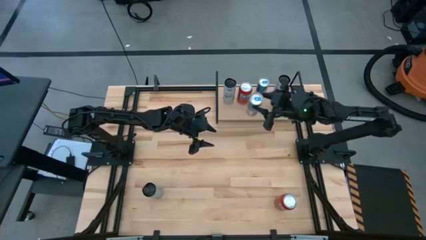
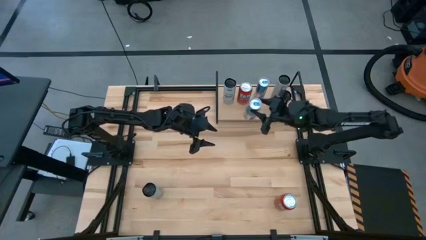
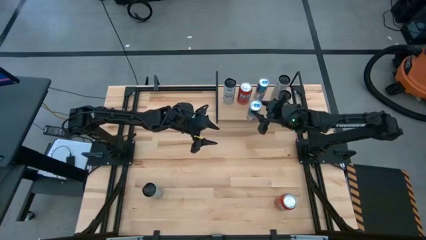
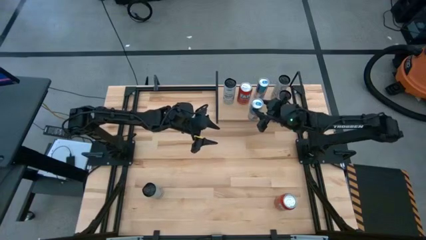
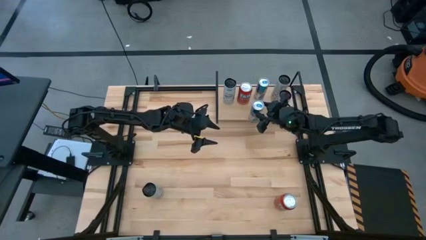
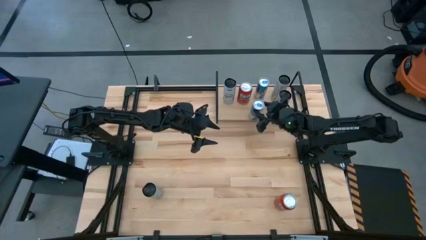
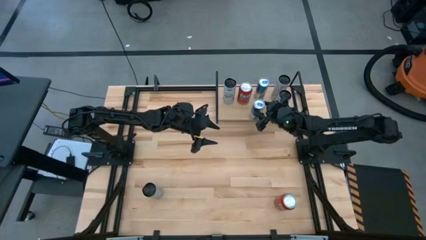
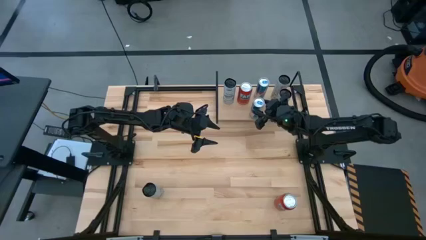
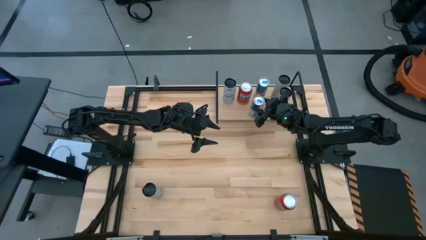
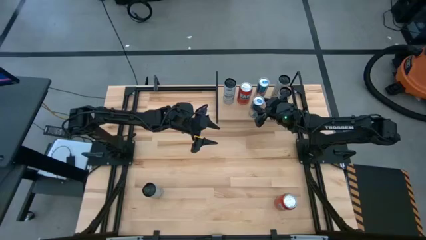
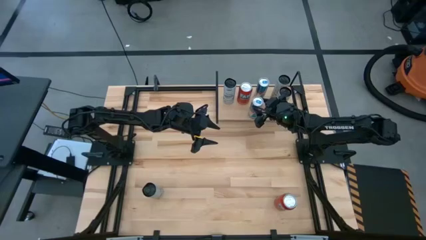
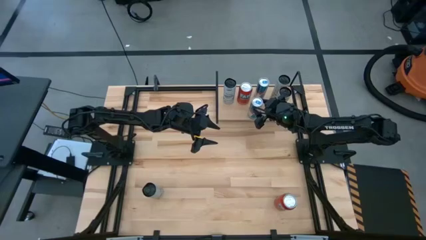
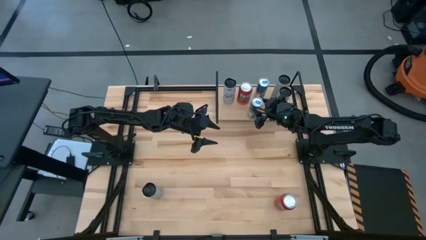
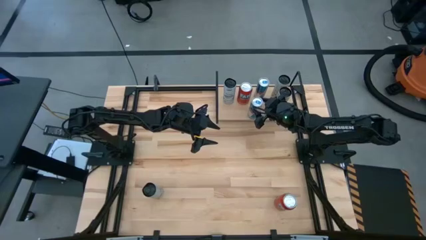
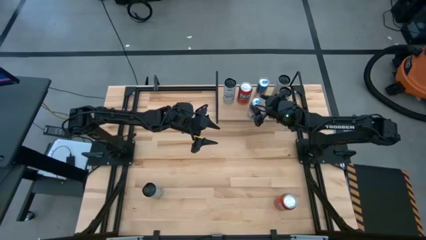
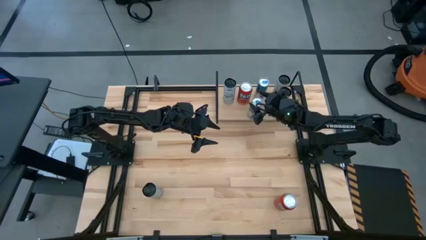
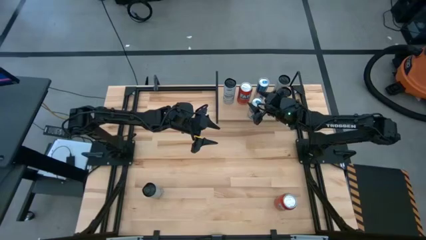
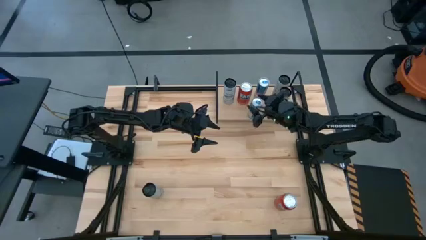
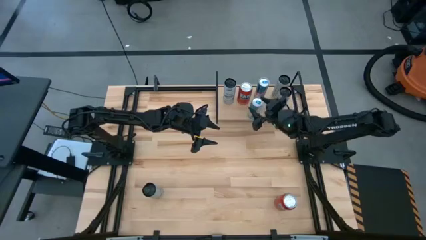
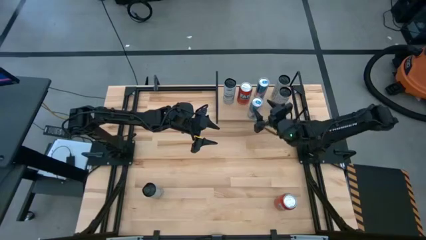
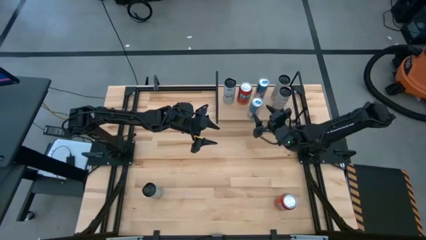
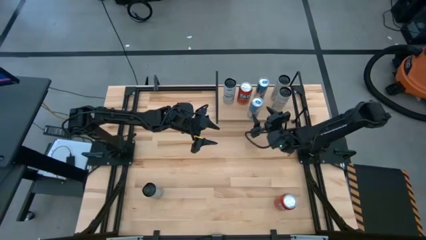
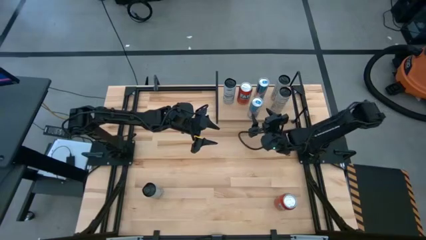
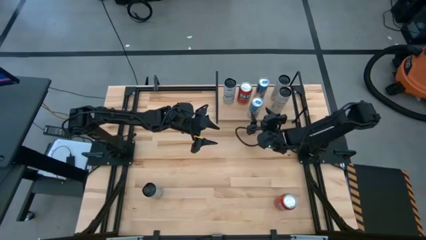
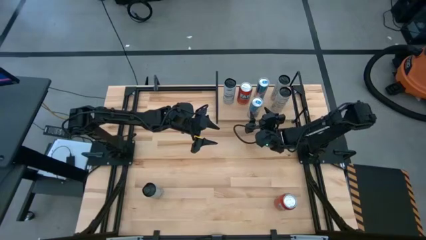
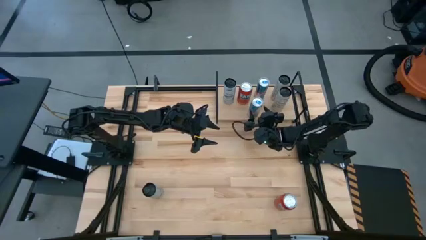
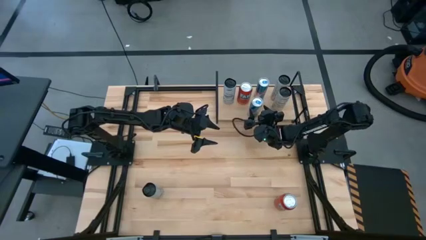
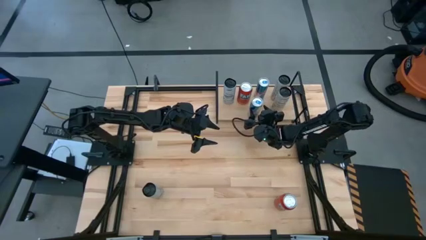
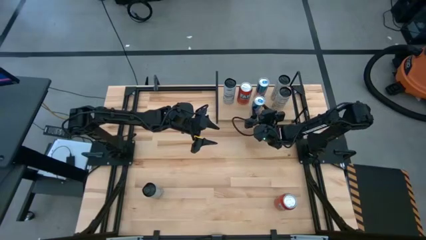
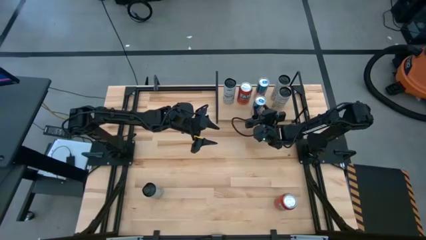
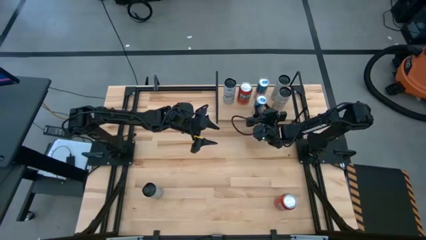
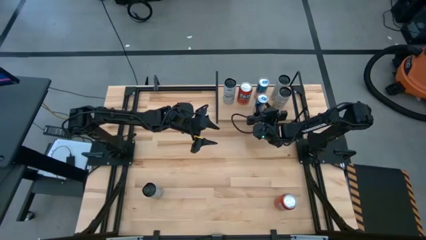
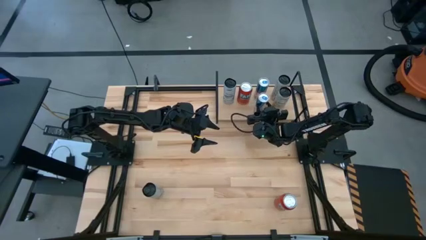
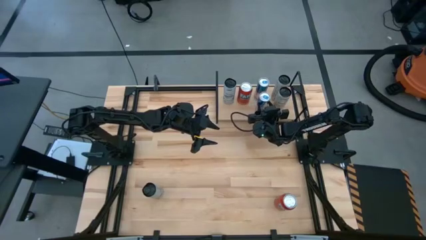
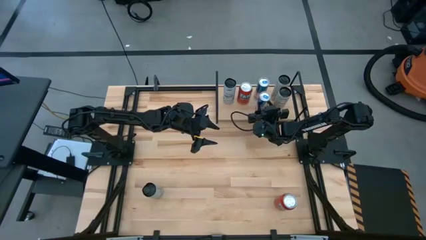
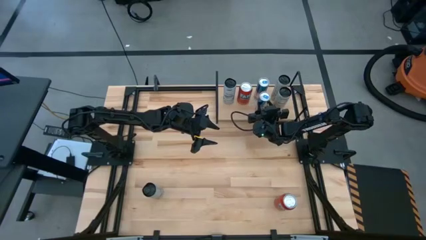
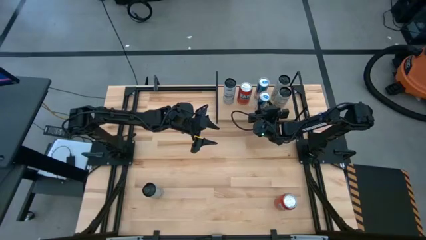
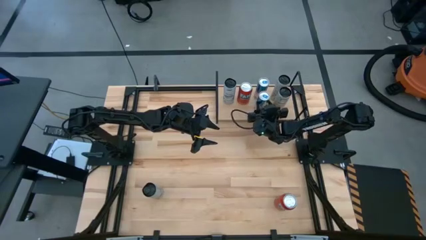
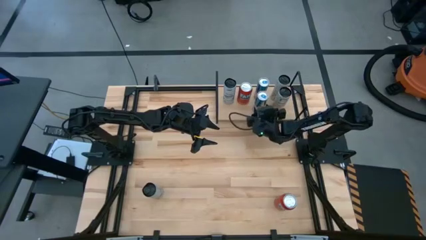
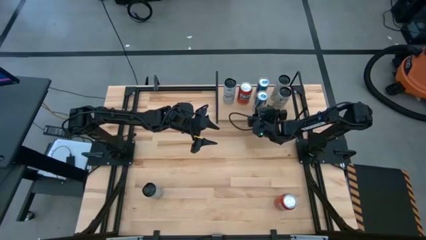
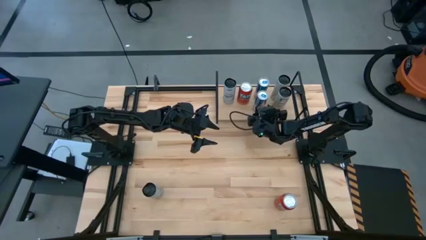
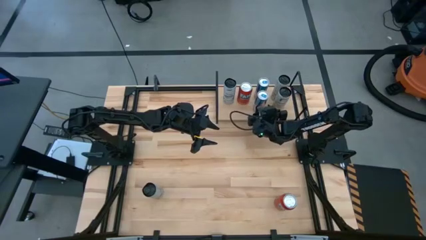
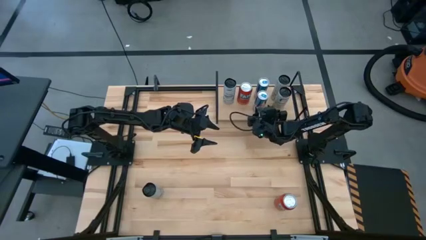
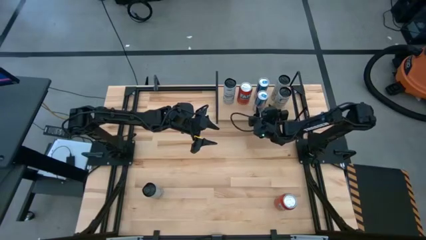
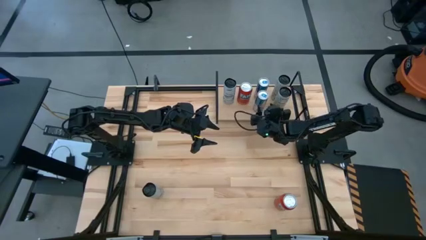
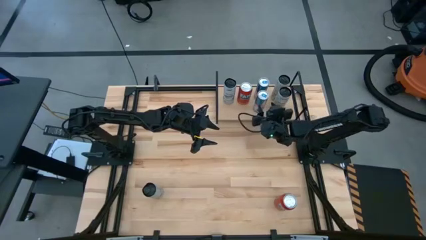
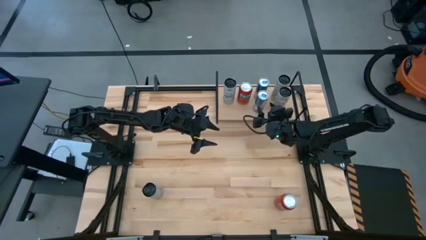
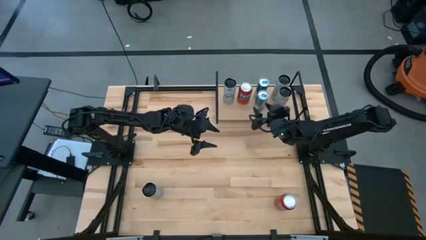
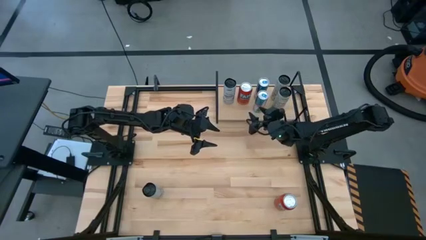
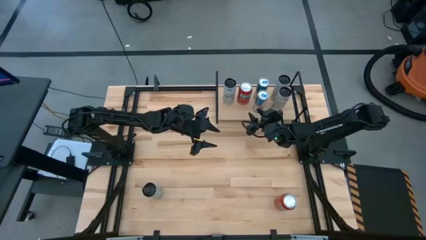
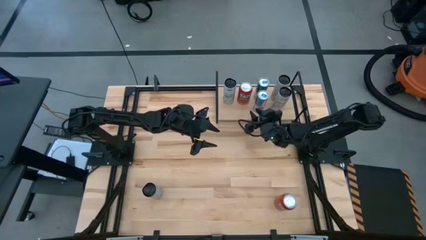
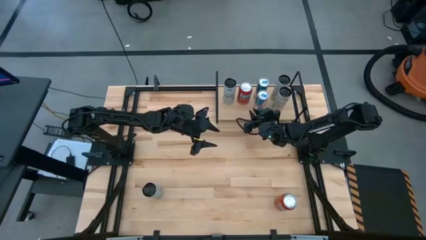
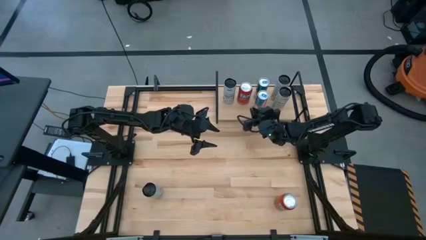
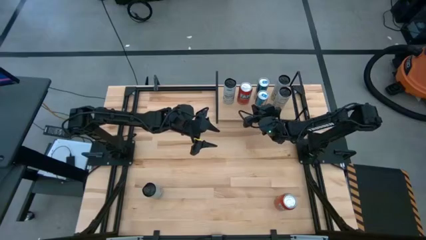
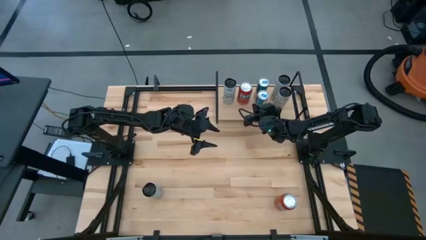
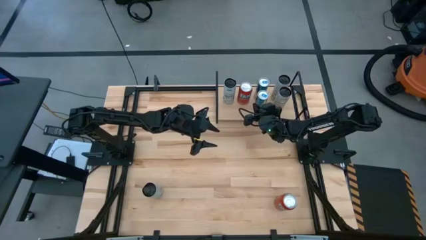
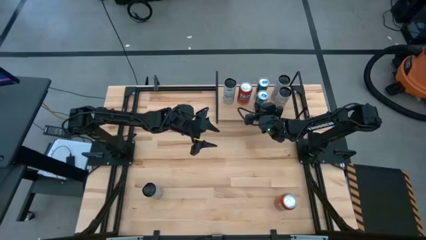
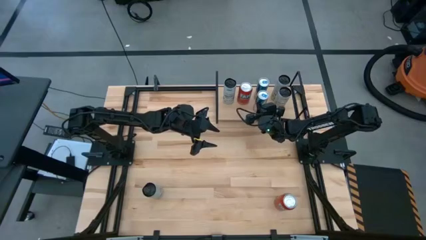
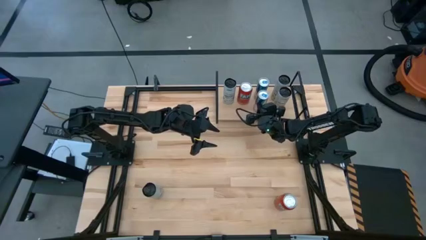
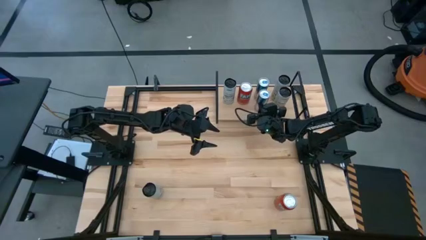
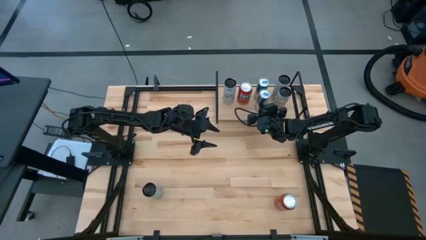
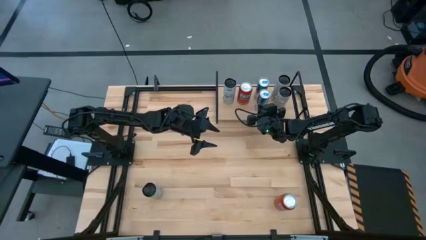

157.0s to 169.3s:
Task: Place canned beverage on shelf
Put the blue soda can on the shelf aligned with the other blue soda can

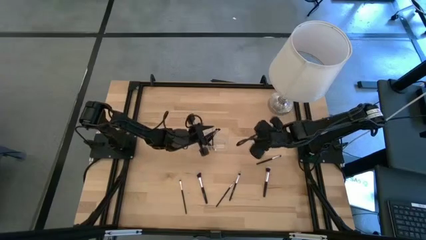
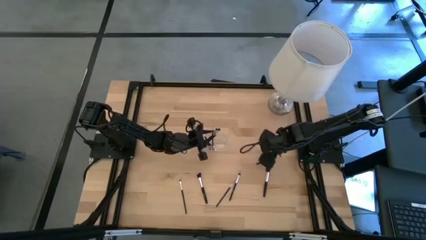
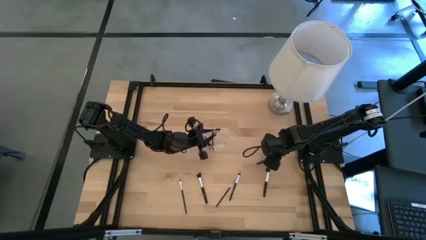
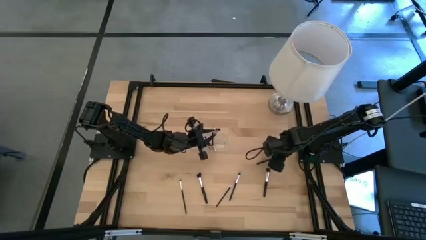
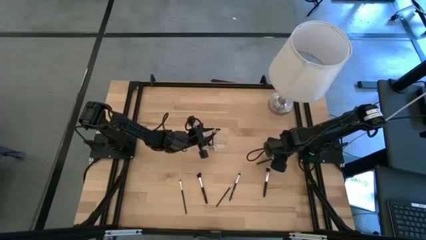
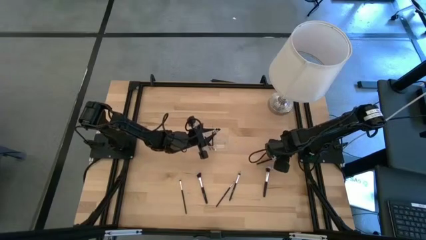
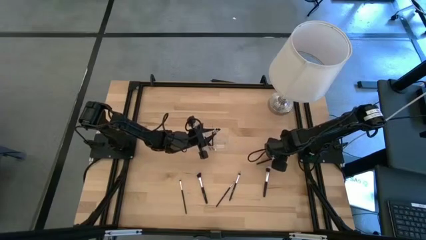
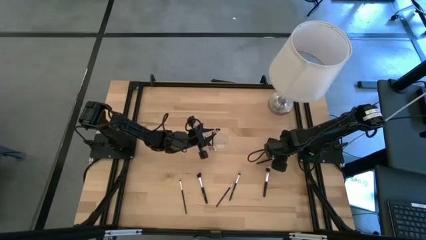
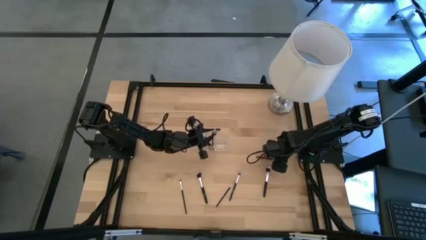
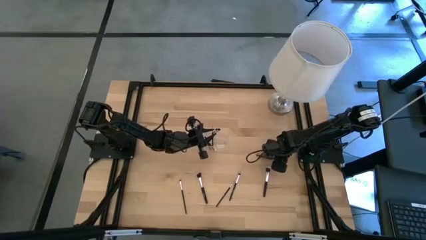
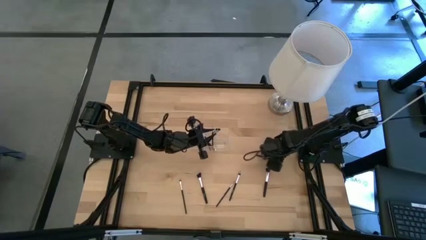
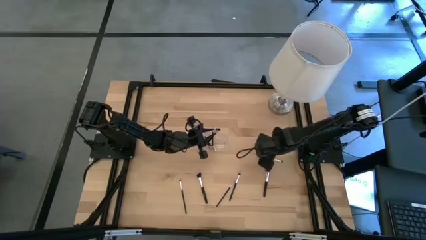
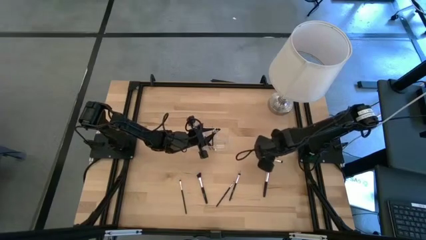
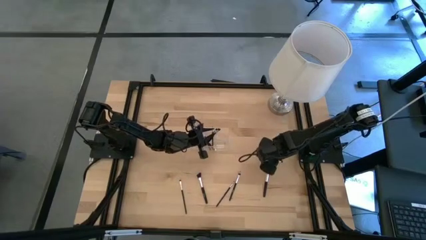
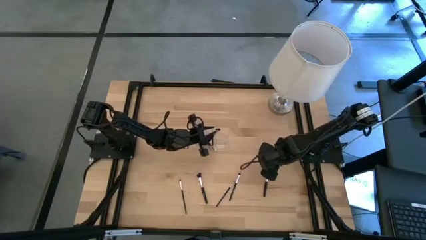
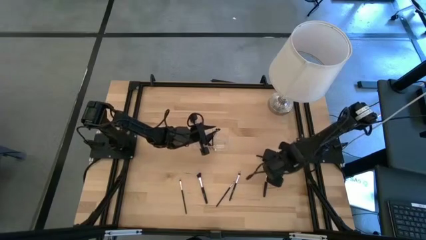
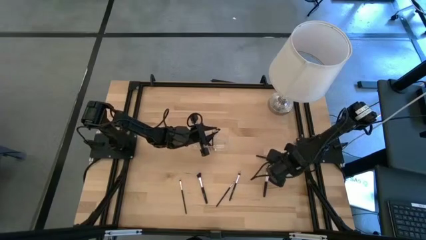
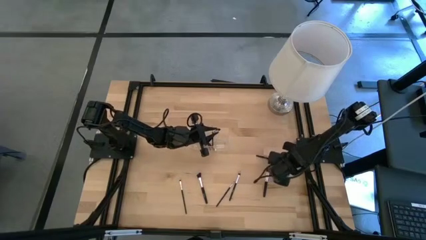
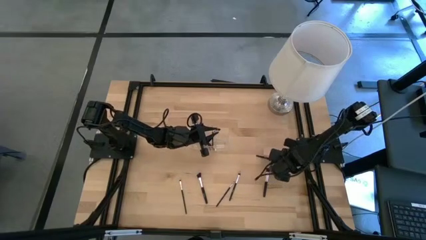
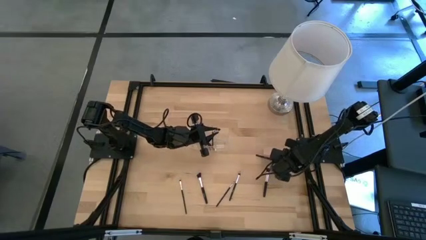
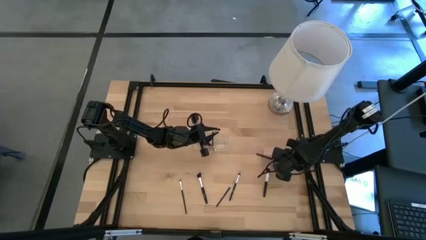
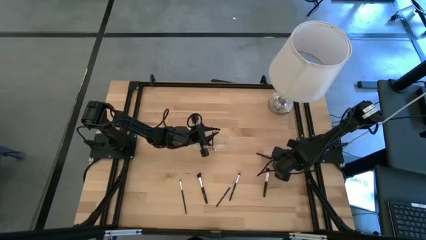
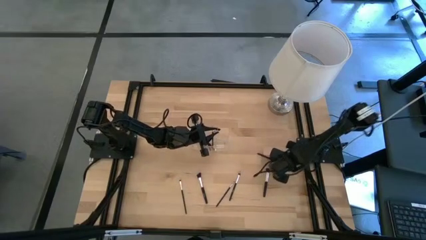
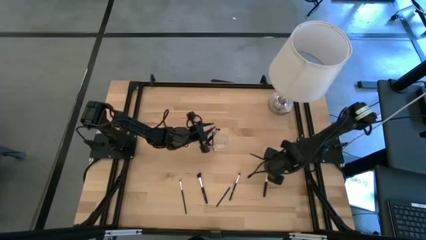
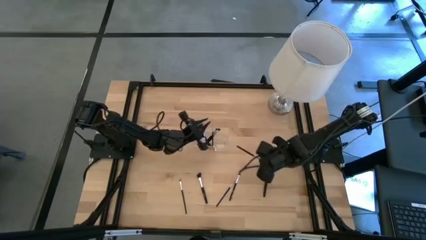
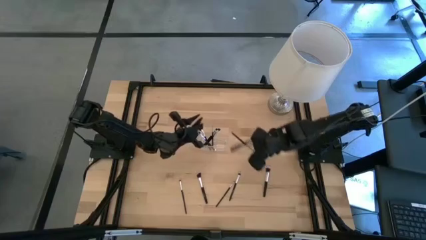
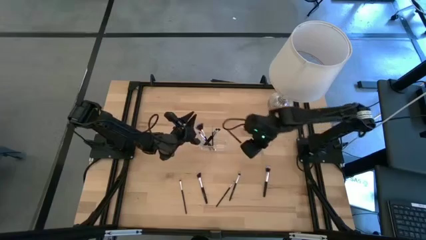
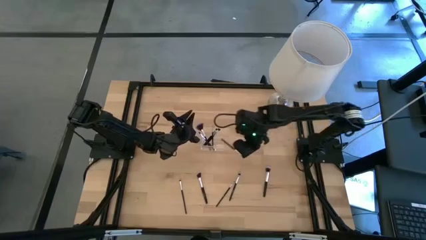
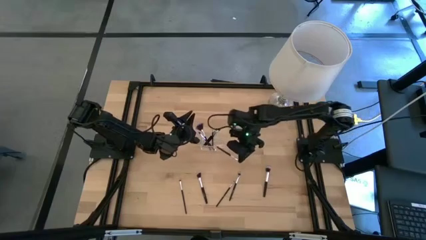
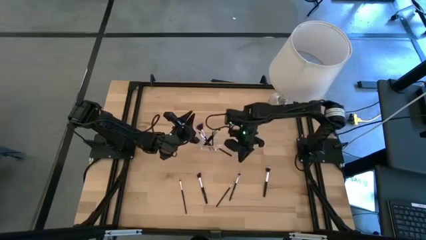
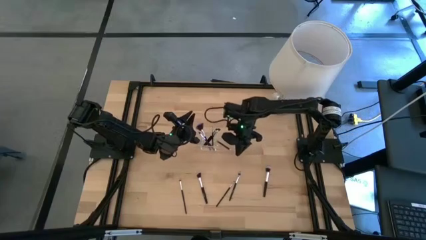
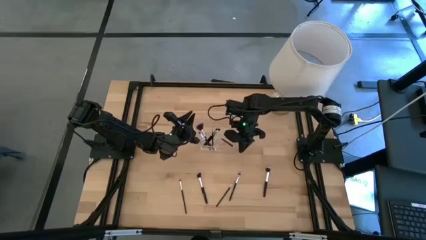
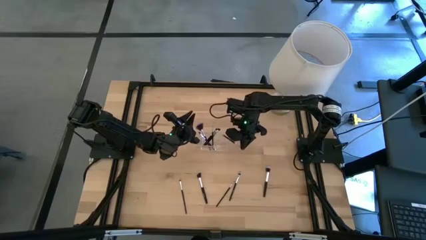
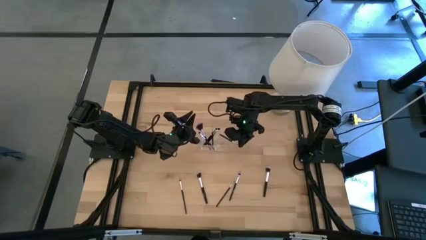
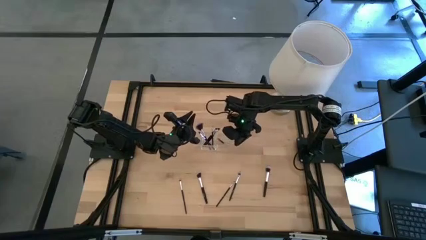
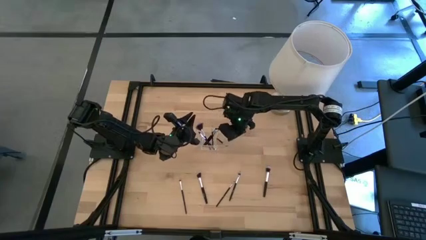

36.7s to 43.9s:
Task: Put items in baskets/containers
Put the eyeshadow brush into the transparent organizer
